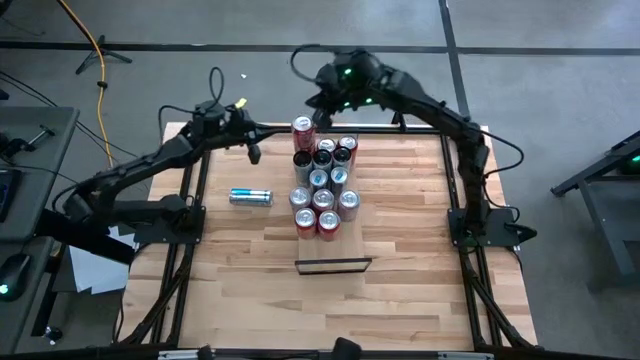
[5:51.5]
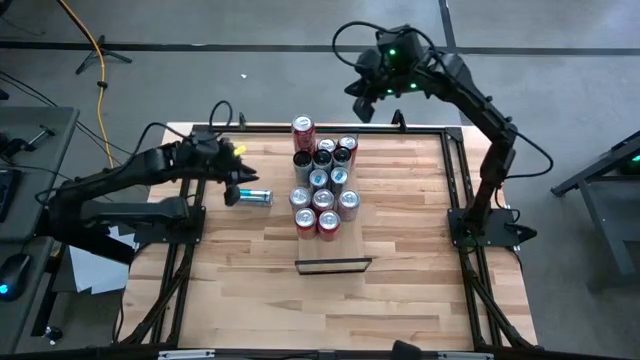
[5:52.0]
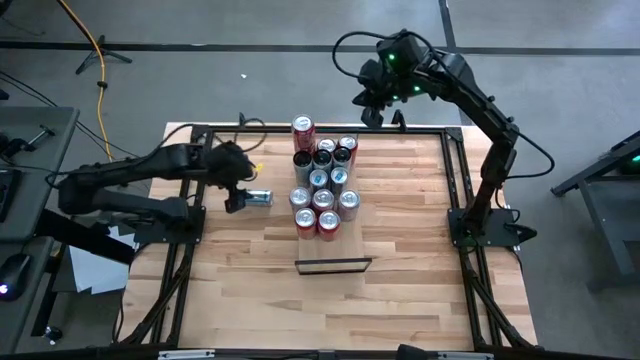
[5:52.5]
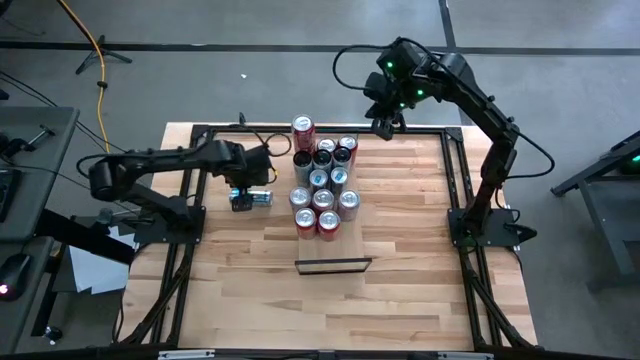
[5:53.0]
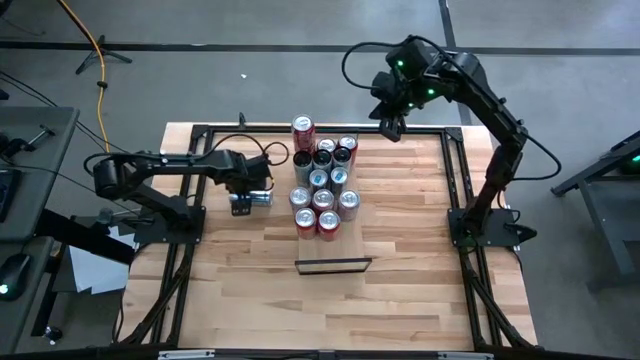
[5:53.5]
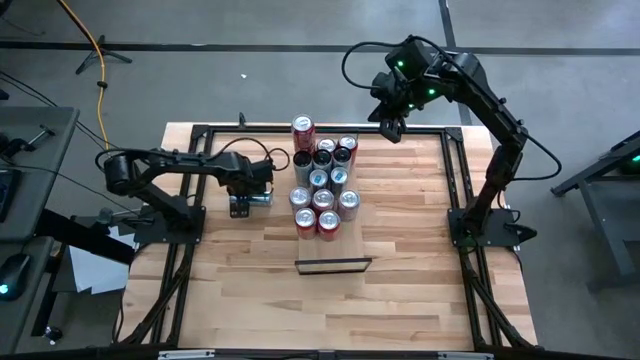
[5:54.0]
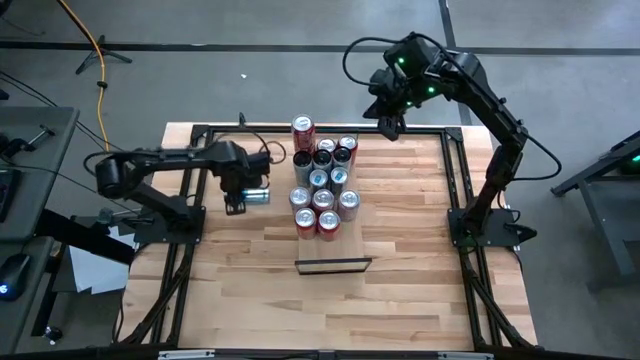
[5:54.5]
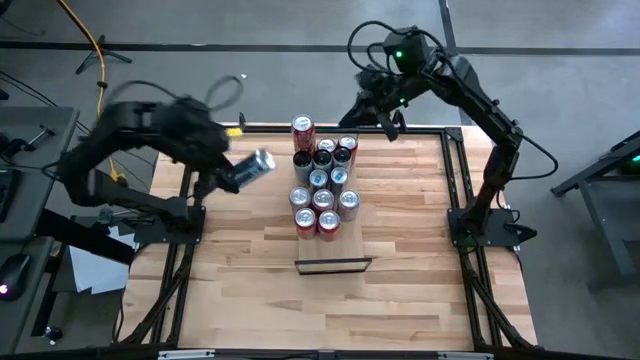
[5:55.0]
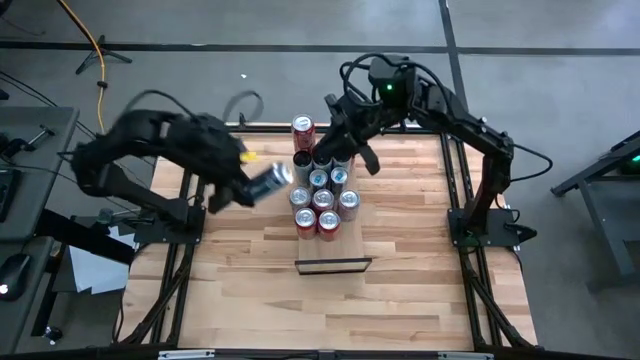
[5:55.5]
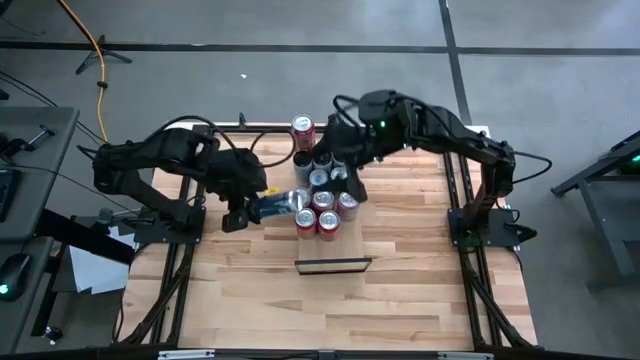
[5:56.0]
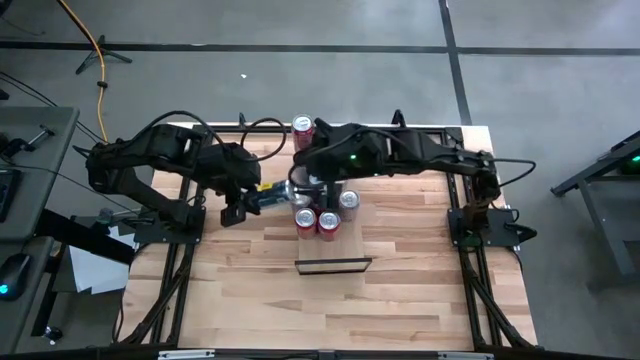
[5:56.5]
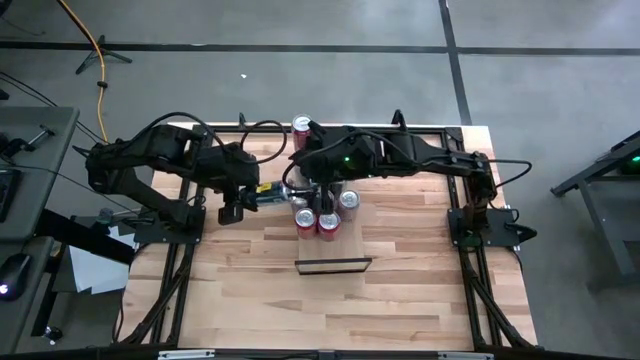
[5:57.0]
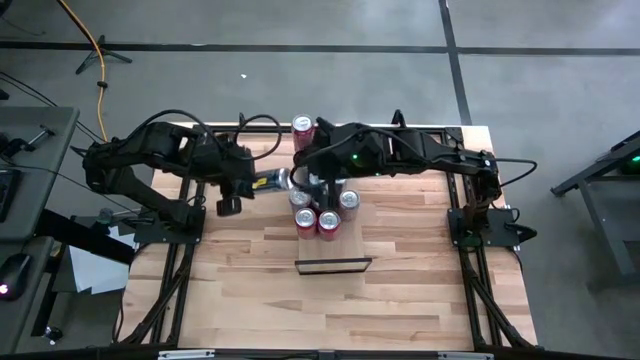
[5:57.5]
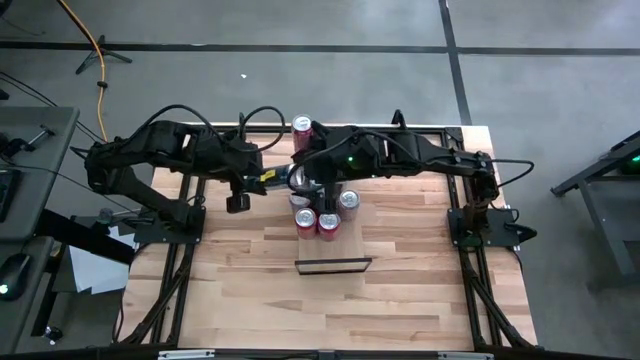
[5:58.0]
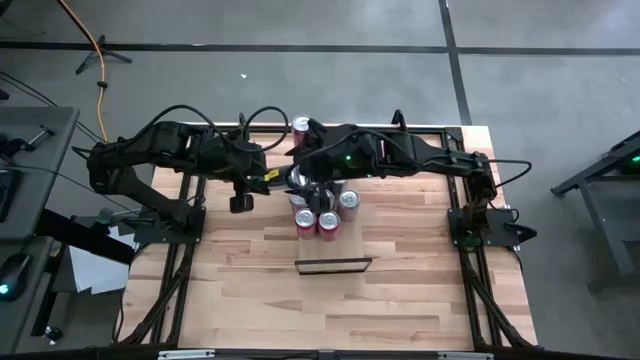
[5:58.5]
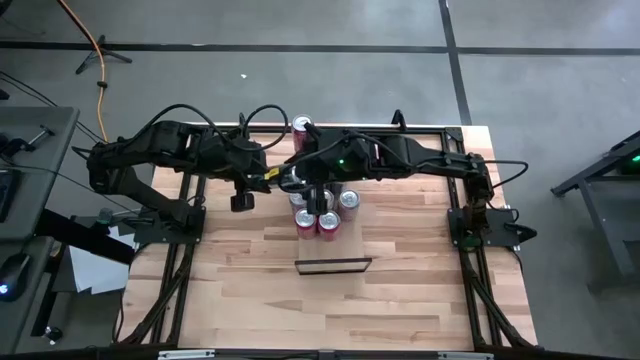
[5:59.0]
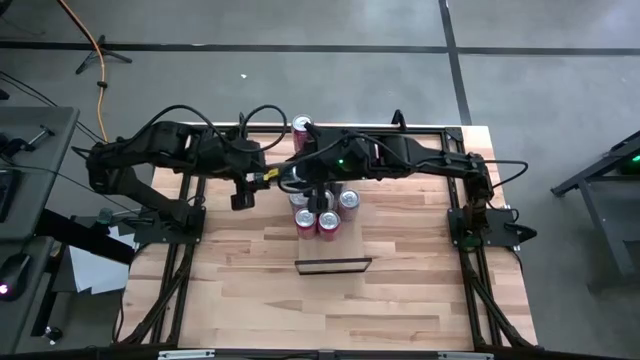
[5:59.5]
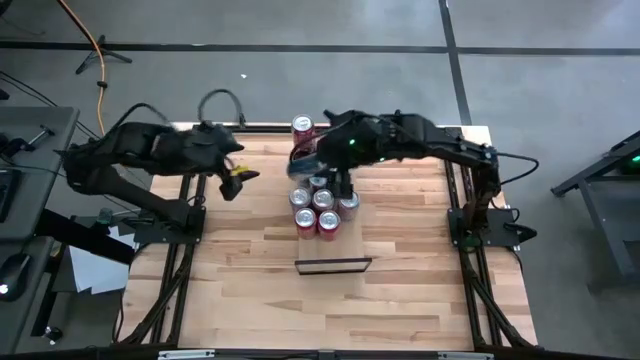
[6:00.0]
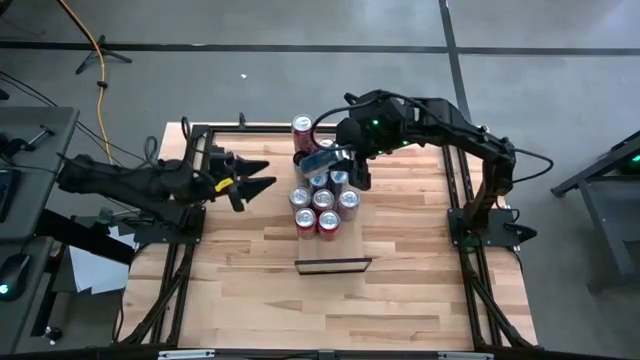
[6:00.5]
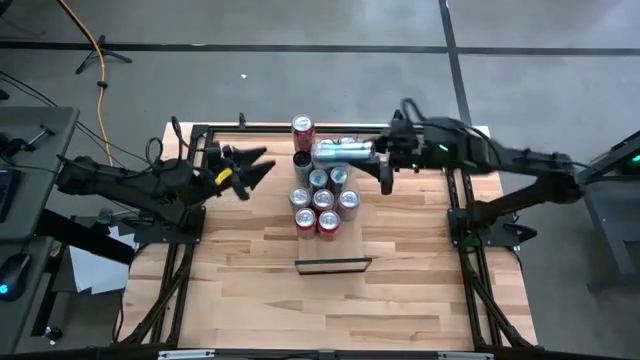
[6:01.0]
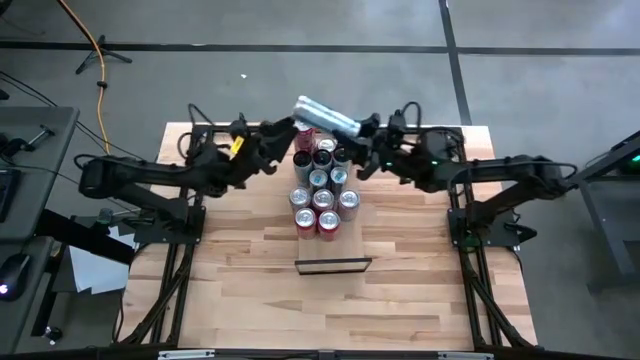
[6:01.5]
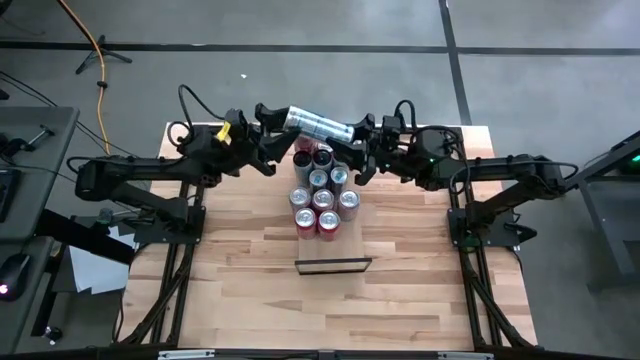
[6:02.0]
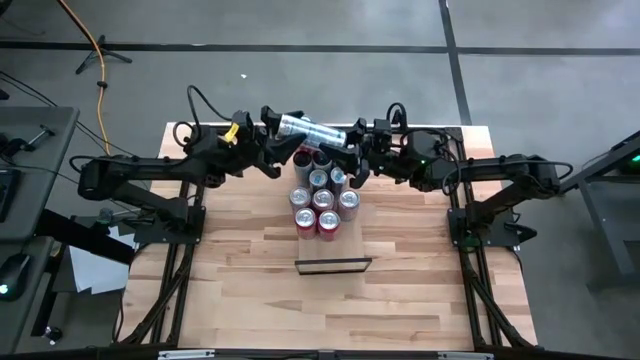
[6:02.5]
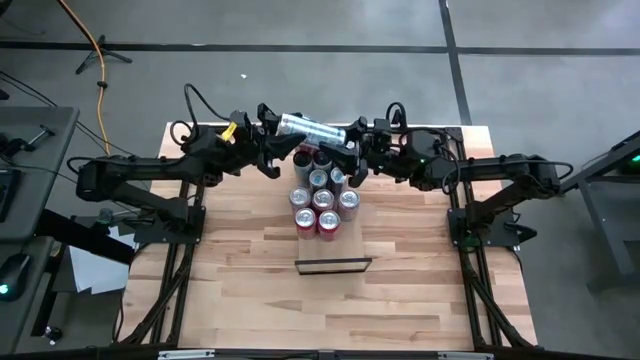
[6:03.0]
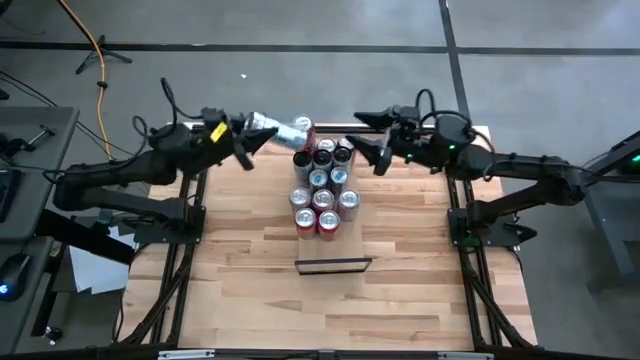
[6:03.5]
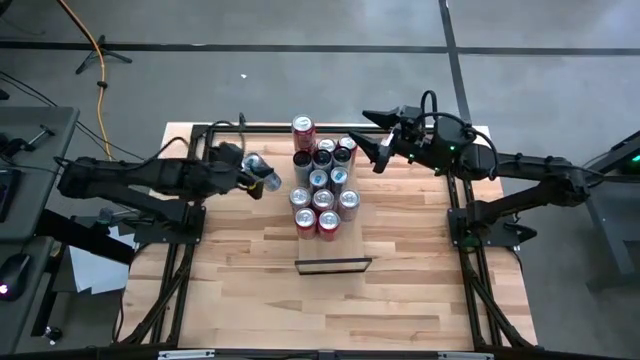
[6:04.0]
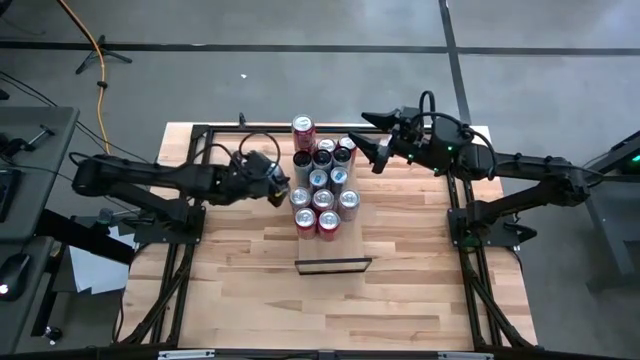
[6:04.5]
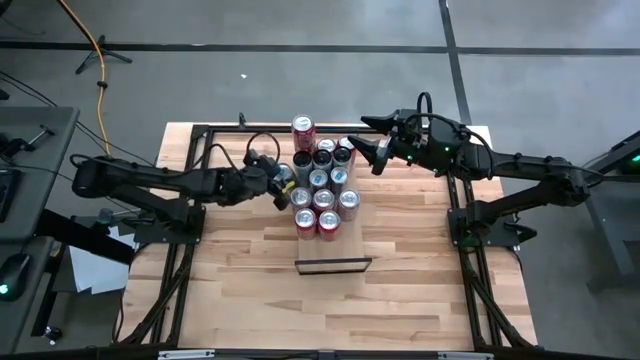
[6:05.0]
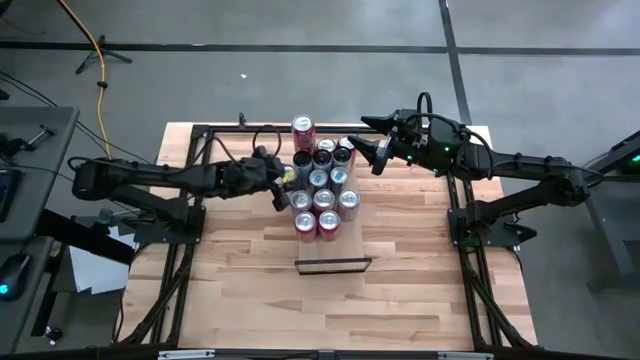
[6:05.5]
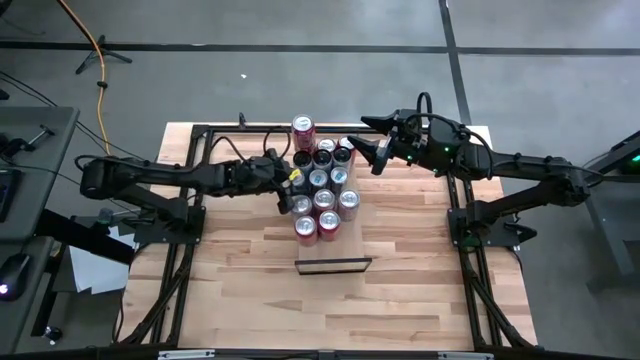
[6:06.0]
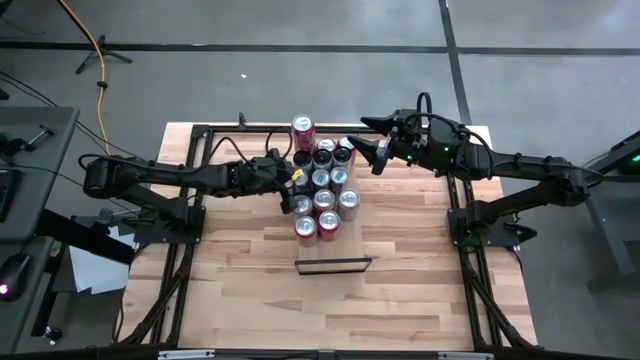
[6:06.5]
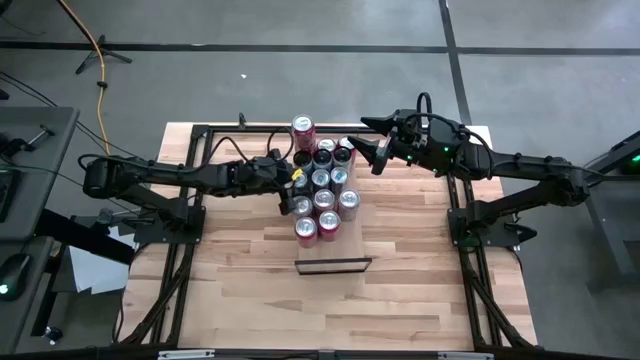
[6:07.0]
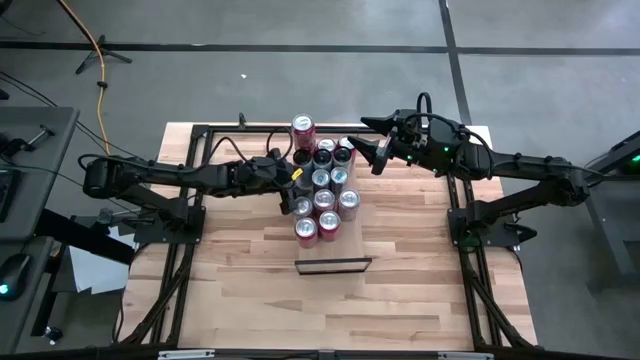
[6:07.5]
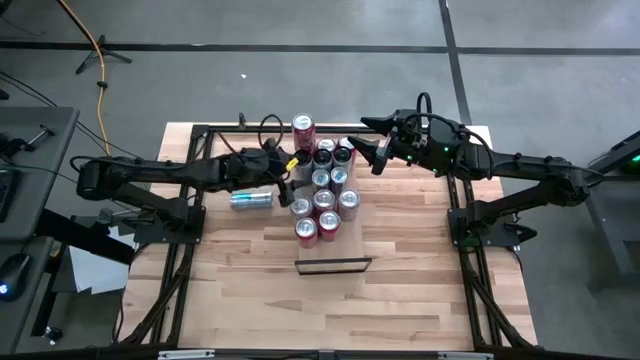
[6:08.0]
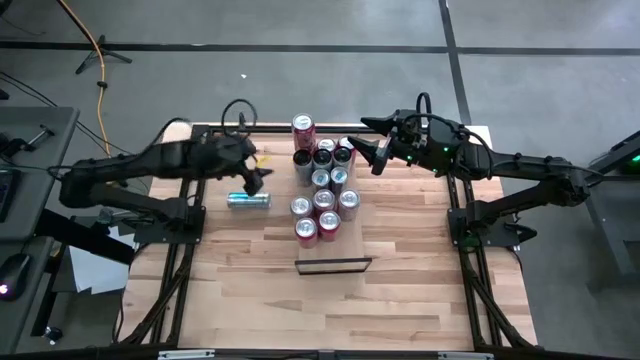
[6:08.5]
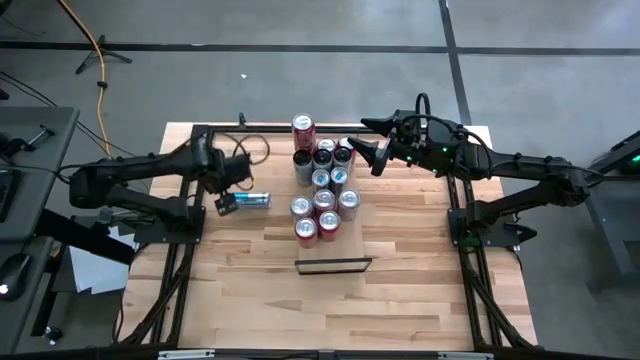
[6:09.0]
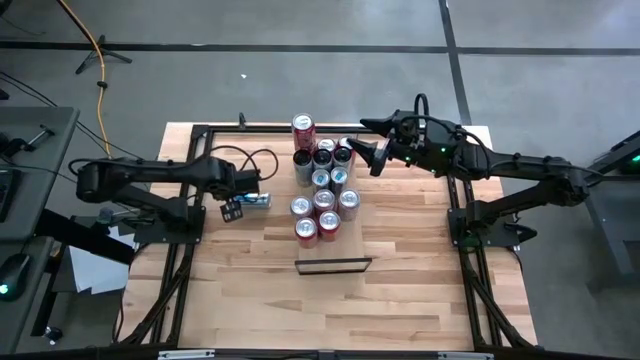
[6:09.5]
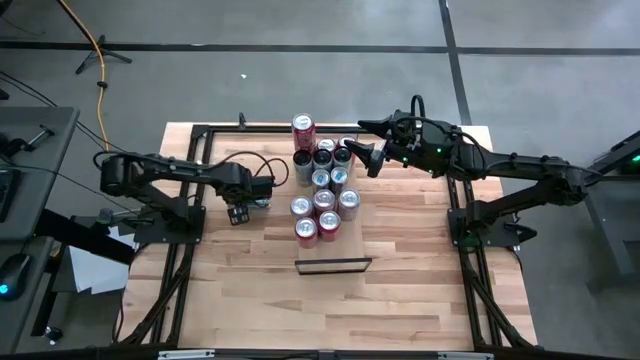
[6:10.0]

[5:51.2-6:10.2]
Task: Place canned beverage on shelf
Put the blue soda can on the shelf aligned with the other blue soda can

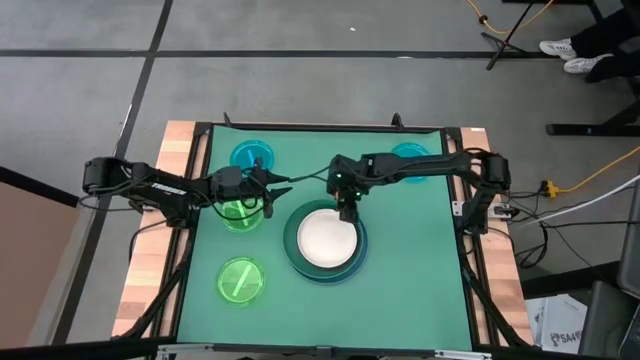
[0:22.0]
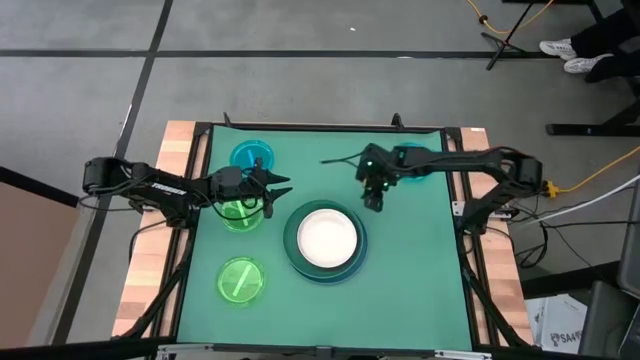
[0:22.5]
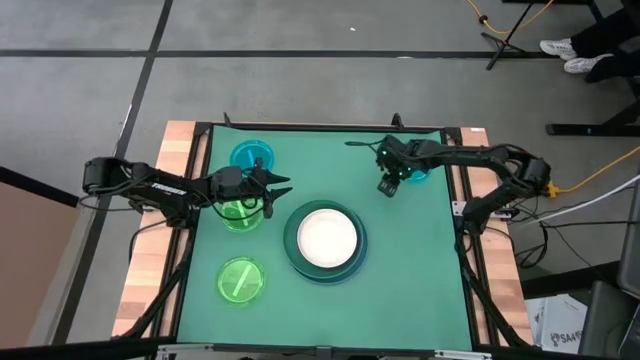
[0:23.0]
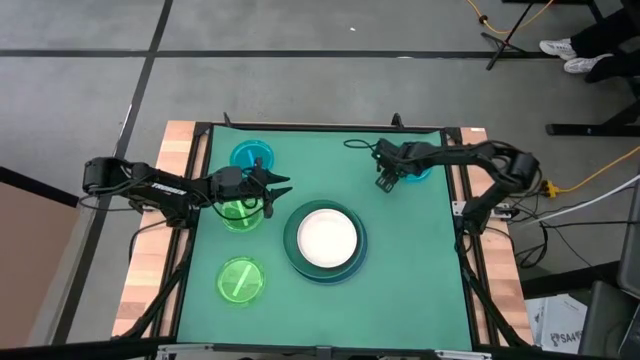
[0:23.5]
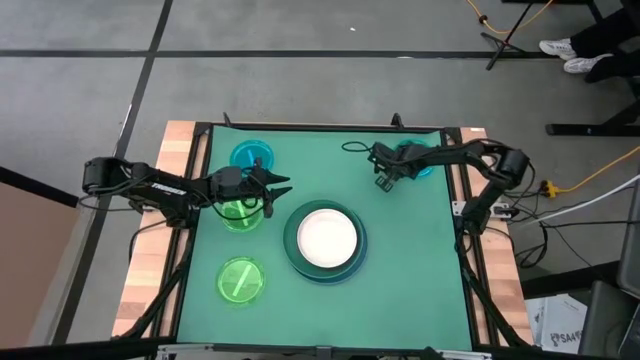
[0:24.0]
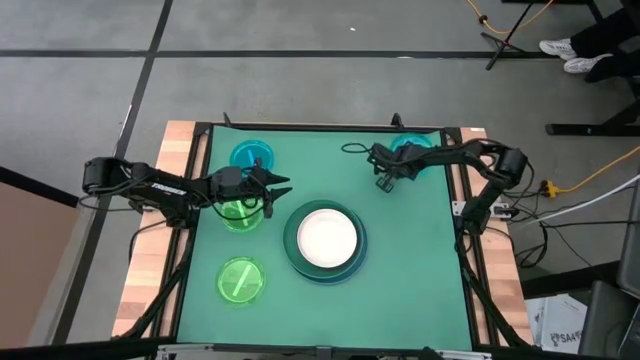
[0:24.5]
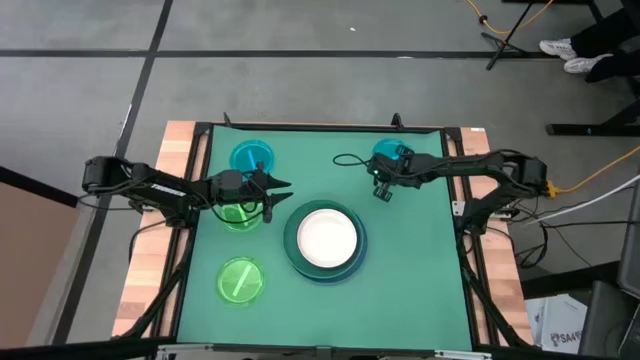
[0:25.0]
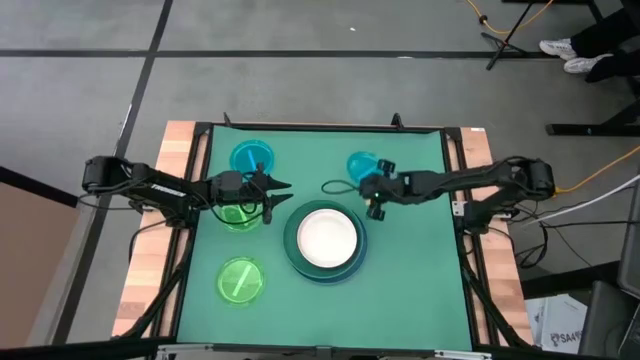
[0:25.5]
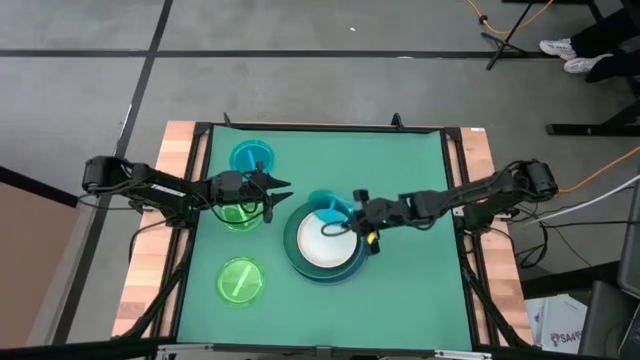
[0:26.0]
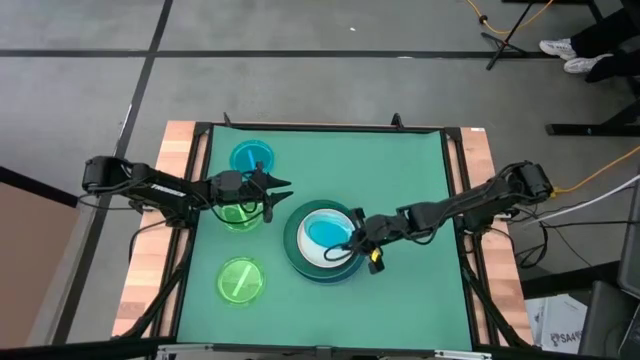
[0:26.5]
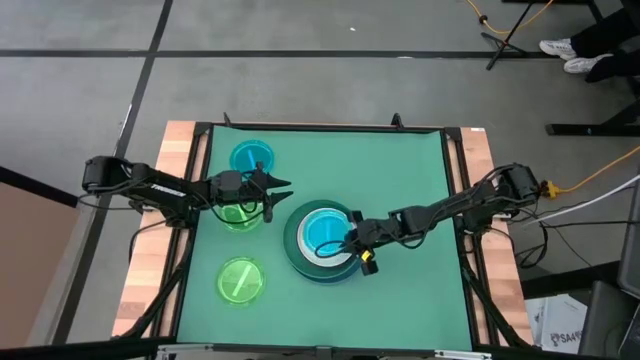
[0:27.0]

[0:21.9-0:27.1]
Task: Stack plastic plates
Stack the right light blue plate on top of the white plate
